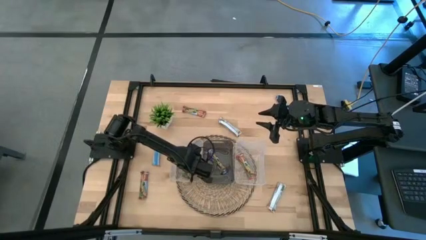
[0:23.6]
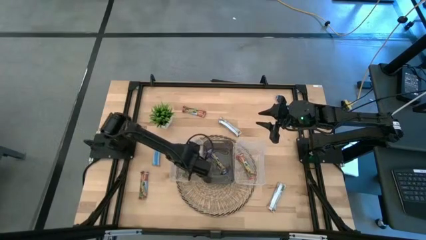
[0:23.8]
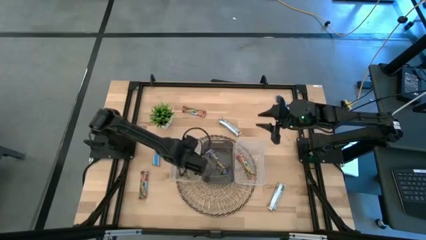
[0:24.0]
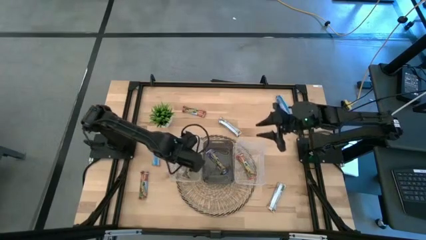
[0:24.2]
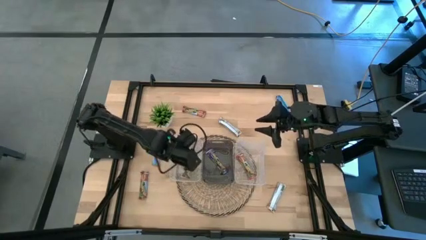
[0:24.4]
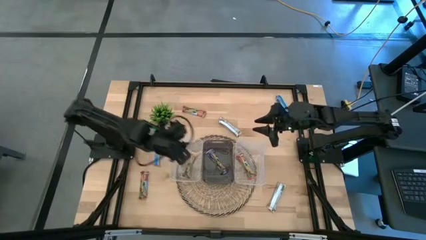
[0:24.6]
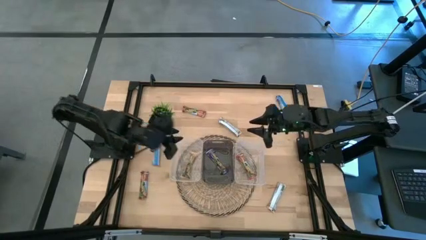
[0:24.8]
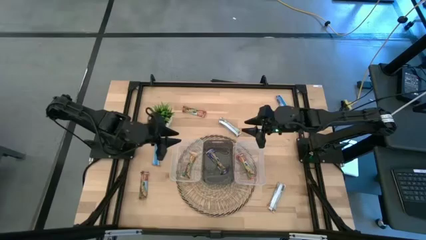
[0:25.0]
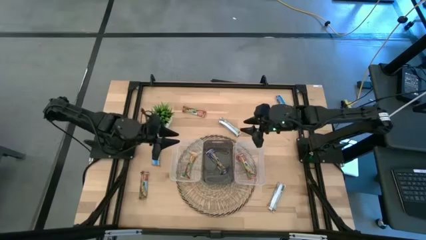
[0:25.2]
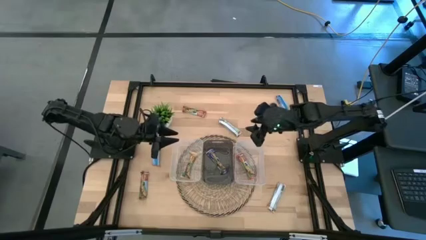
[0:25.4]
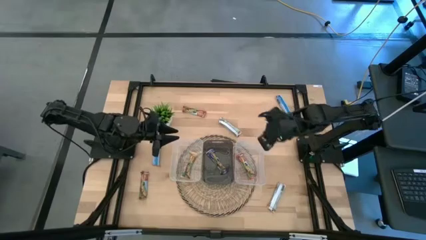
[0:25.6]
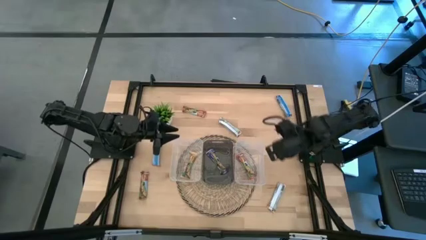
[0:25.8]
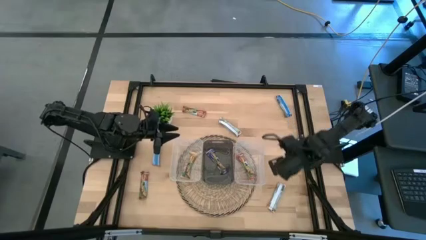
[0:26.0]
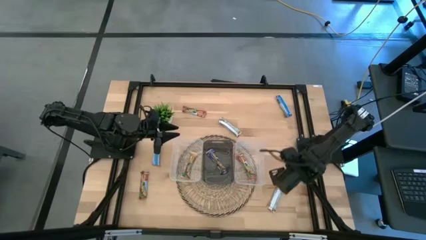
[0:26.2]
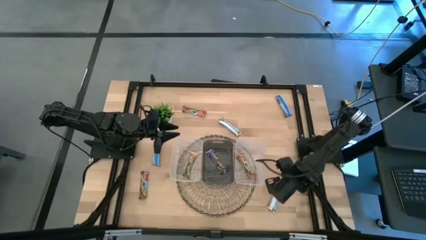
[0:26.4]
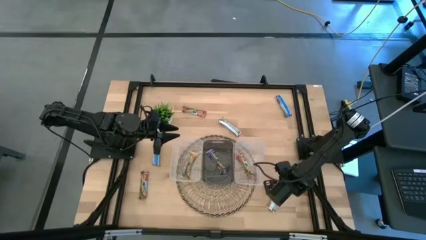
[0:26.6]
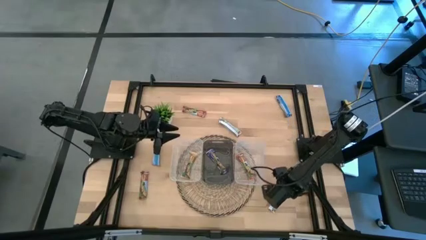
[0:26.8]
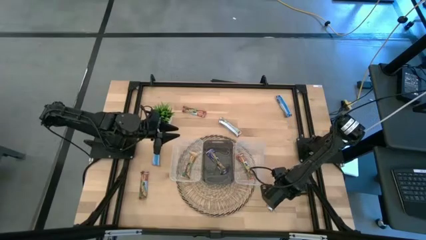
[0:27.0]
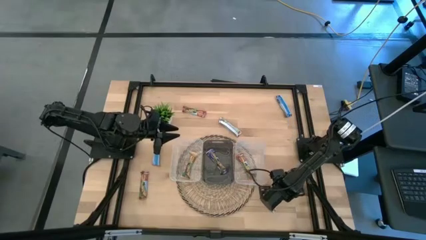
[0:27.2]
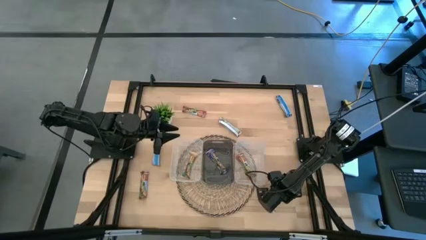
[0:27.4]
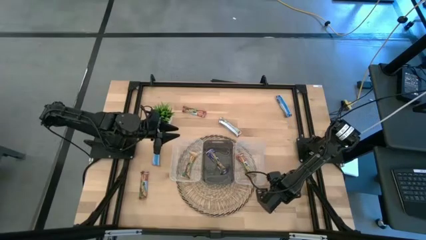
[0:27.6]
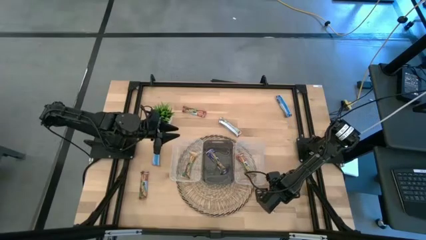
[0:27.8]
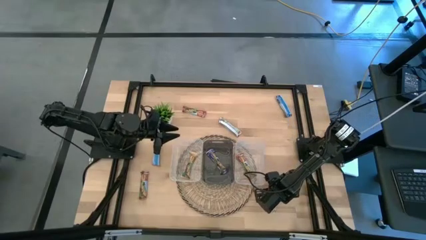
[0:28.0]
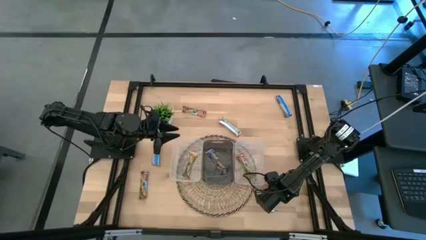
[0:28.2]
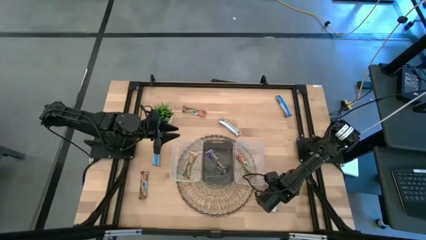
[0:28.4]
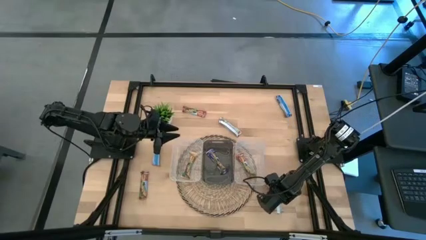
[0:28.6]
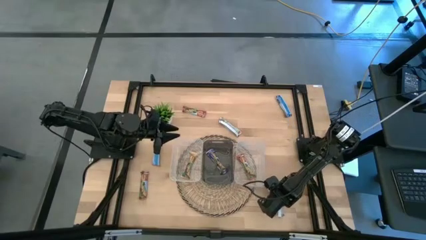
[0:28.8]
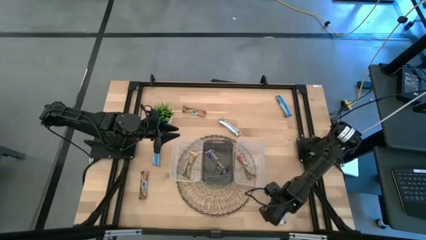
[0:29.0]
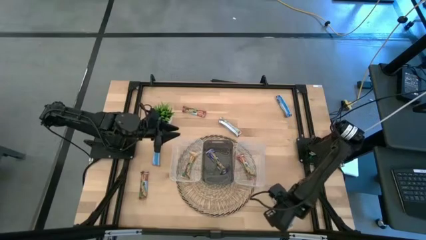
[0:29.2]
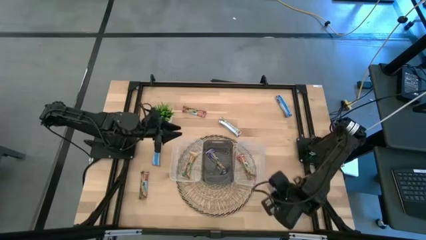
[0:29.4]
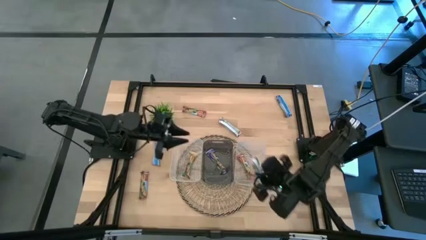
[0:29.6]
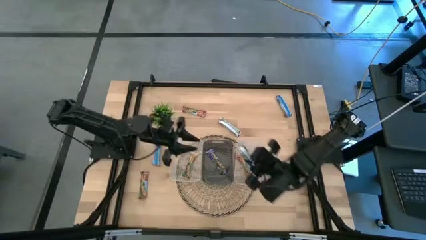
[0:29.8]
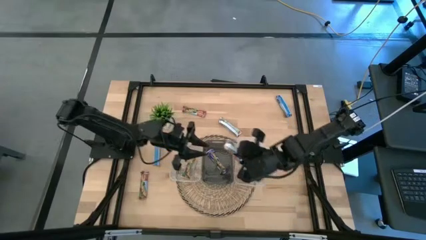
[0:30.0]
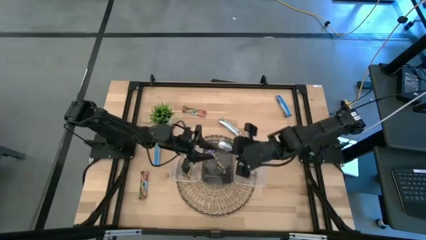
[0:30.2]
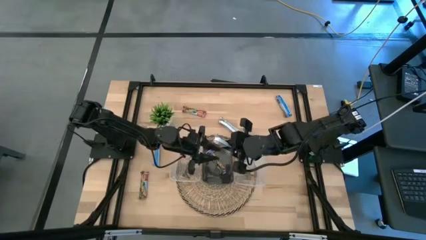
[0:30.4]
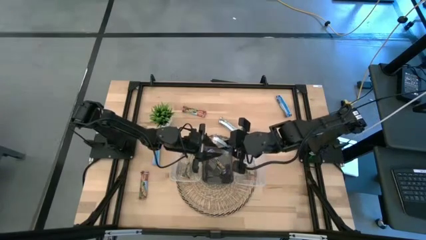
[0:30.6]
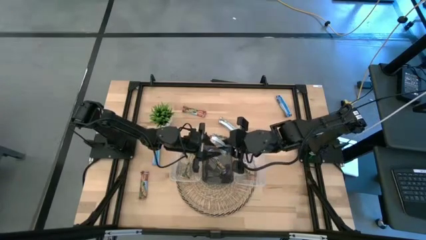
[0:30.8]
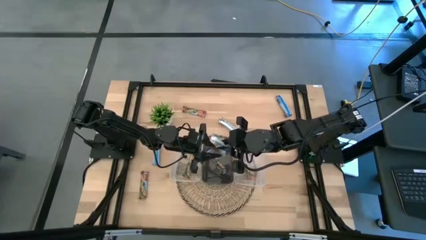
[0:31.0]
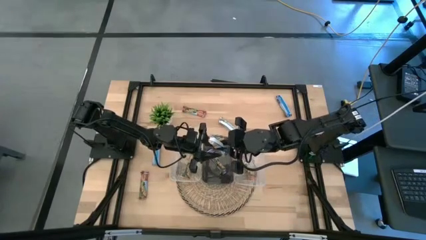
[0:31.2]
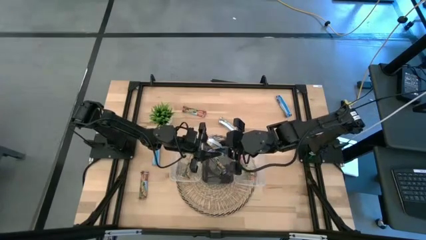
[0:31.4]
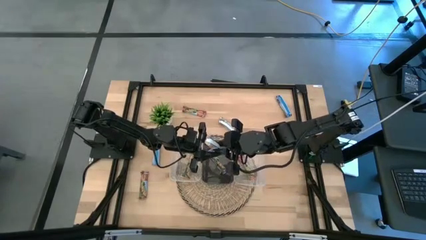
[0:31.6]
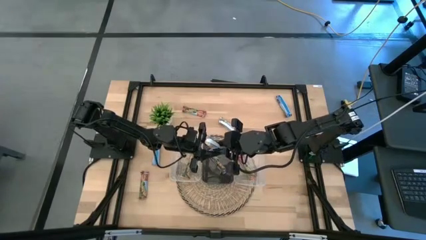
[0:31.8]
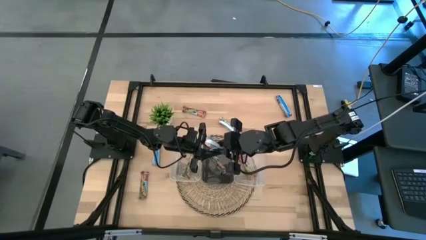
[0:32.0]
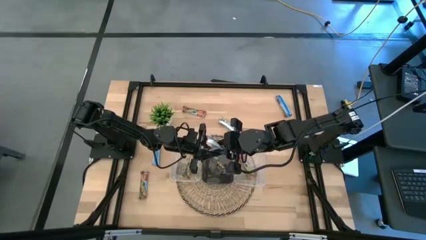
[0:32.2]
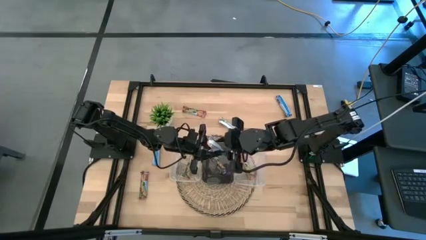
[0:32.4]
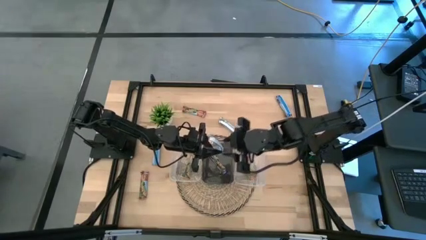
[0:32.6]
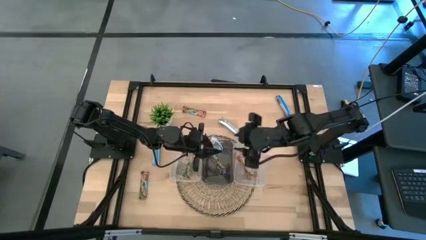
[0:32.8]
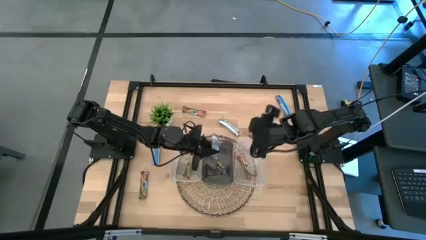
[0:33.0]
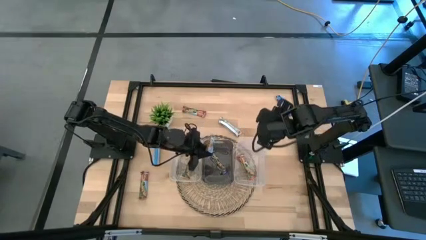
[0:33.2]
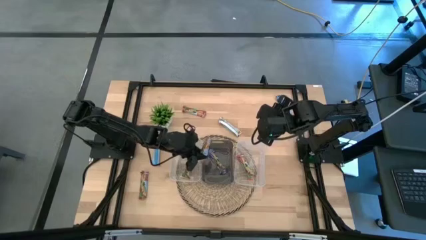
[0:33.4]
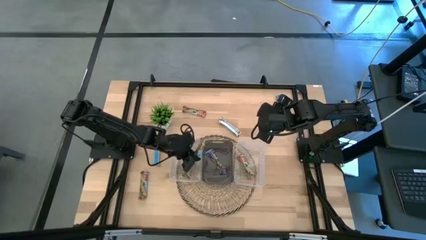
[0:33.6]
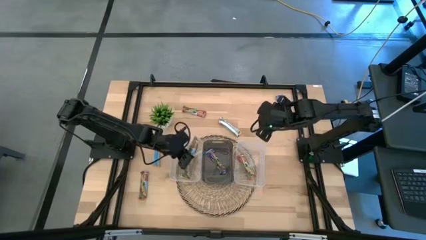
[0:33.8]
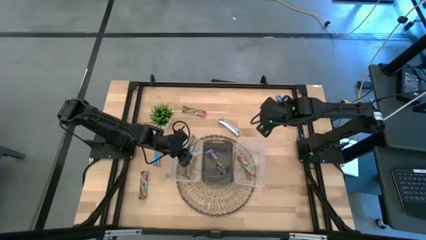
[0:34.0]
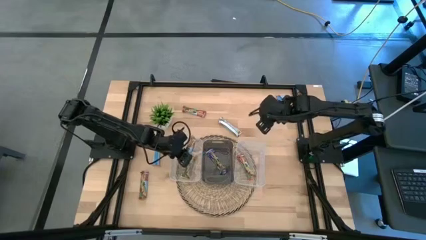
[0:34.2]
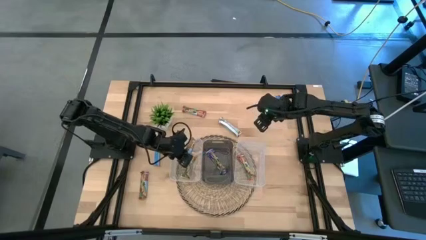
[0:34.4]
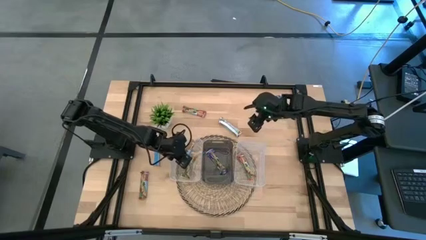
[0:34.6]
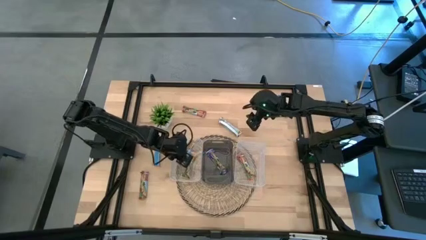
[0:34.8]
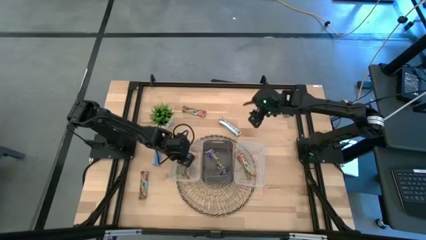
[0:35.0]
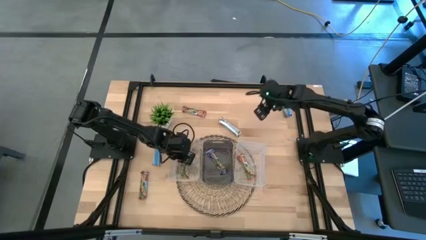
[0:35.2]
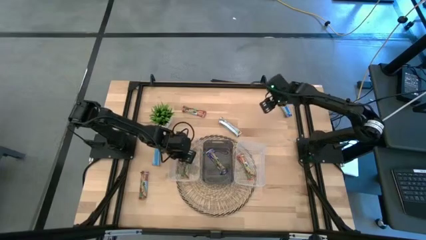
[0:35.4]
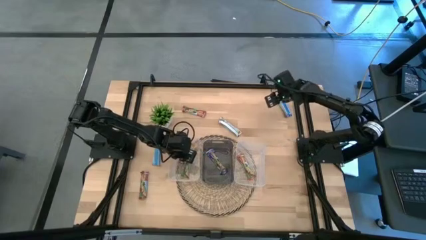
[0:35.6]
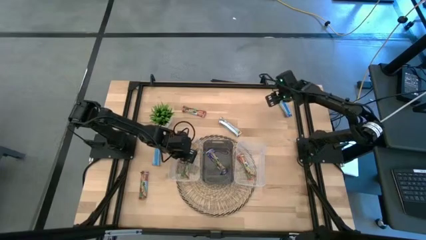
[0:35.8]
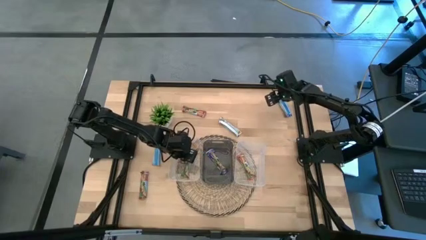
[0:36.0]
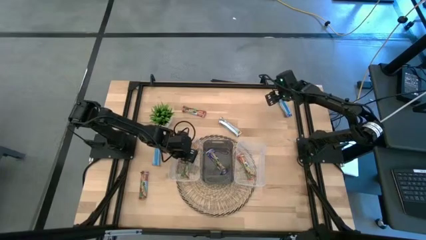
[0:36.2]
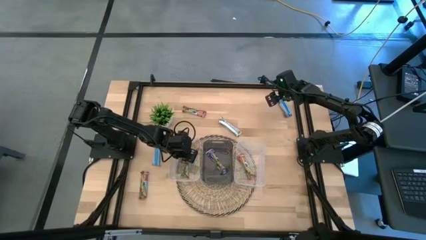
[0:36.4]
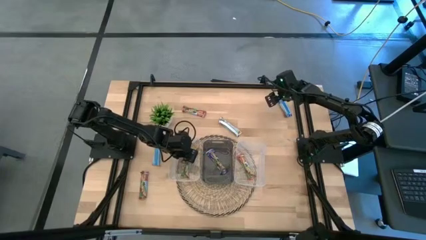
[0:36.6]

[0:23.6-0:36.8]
Task: Pick and place Granola Bars by type
Put the yellow granola bar into the left transparent bin

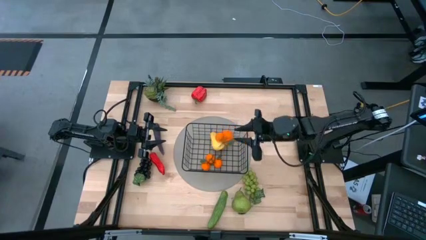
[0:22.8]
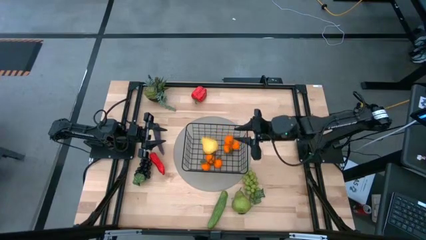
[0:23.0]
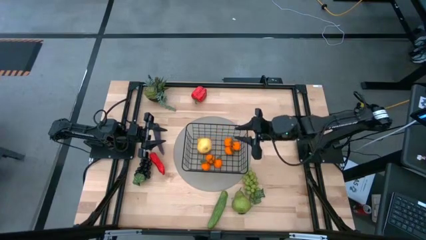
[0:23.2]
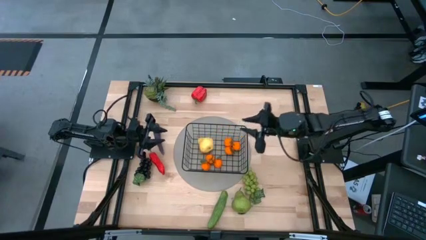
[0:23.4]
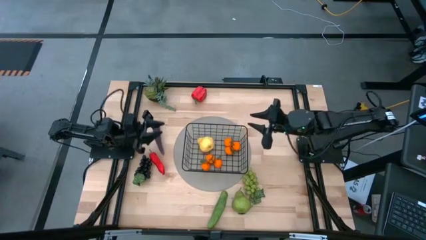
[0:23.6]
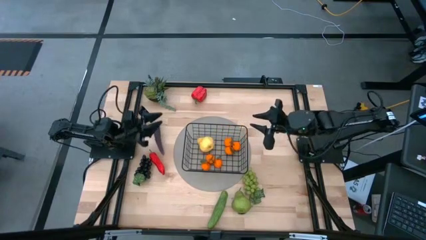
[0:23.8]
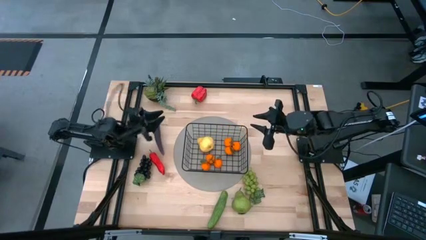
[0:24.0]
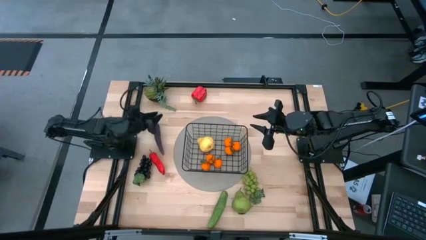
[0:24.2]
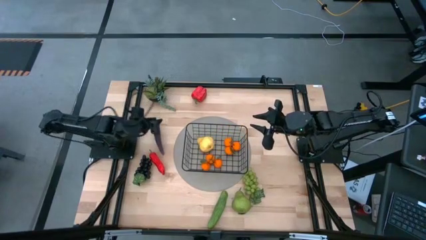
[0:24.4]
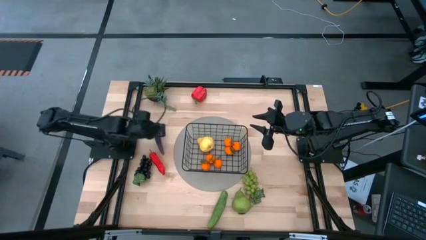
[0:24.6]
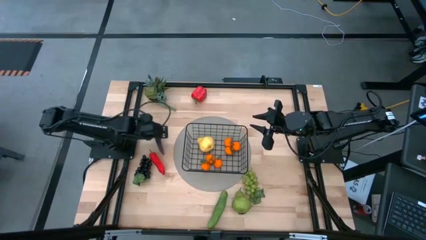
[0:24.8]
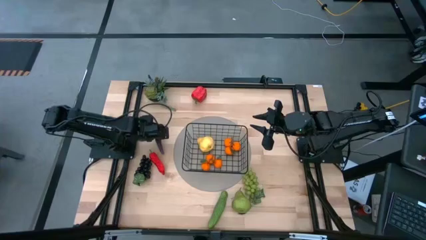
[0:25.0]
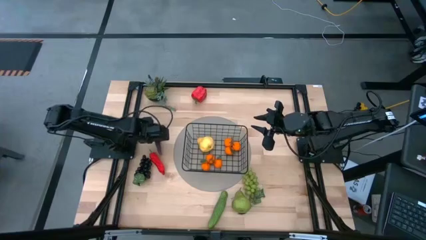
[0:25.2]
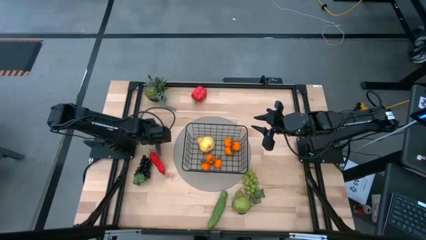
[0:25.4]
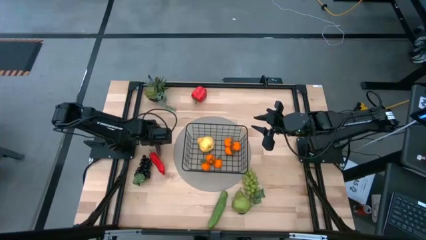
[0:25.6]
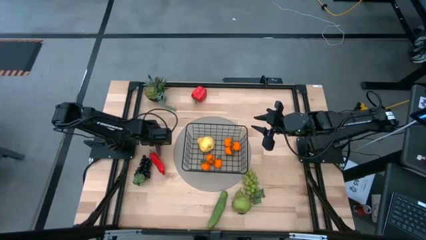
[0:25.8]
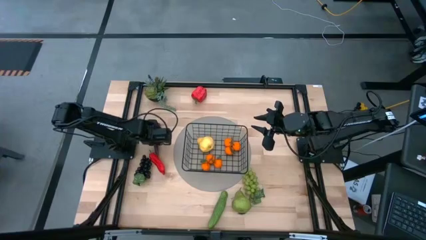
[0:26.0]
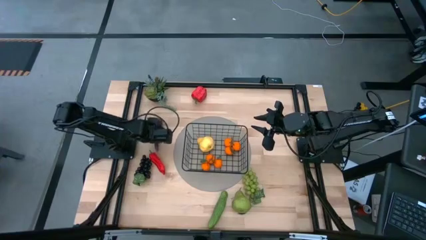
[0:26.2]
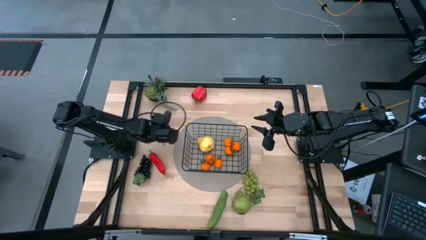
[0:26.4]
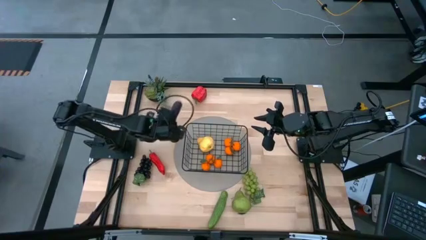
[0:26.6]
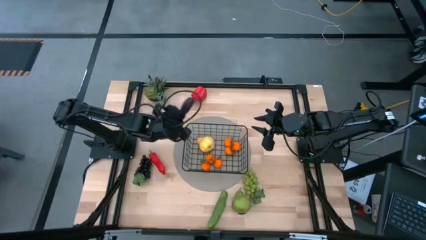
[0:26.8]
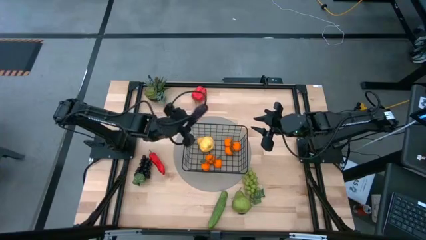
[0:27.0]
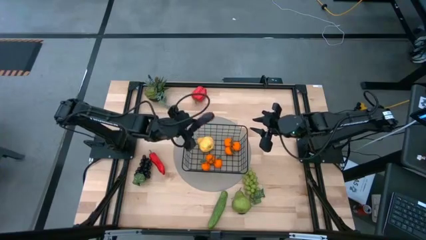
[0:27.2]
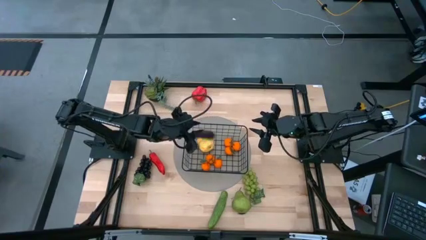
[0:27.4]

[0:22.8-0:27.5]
Task: Build produce basket
Put the purple eggplant into the black wire basket
